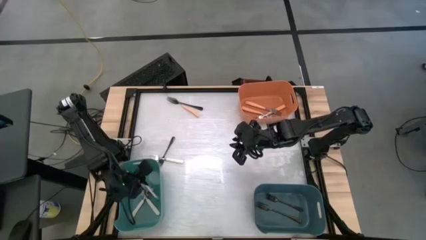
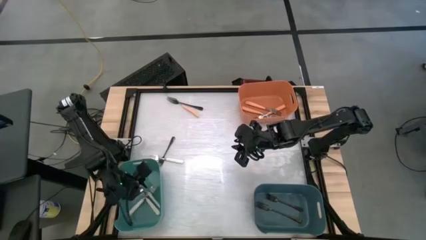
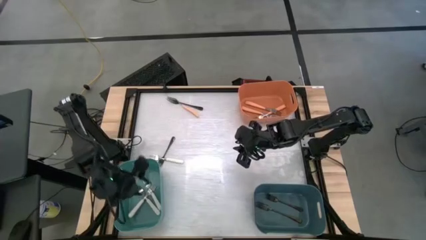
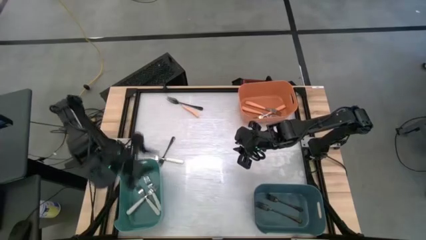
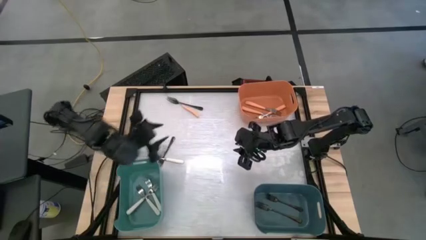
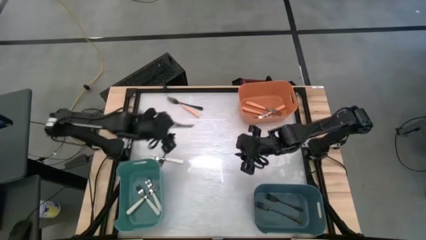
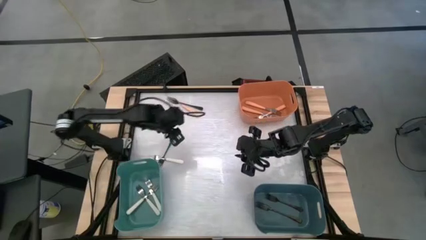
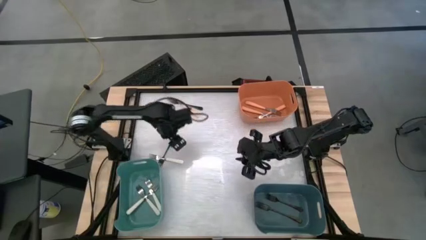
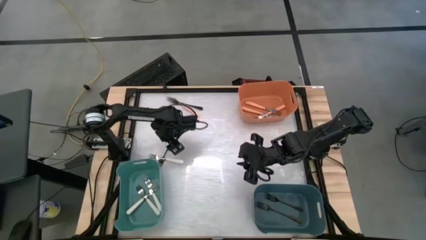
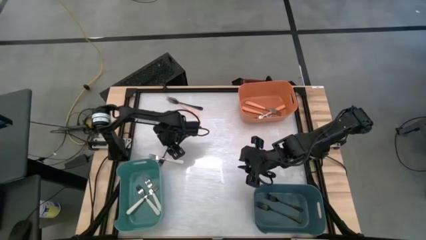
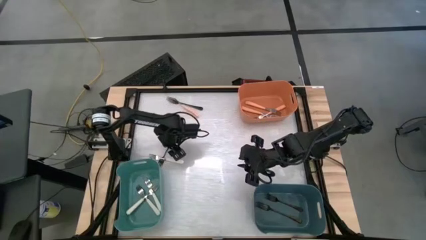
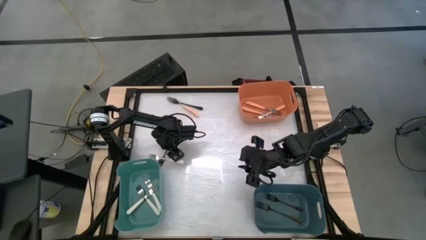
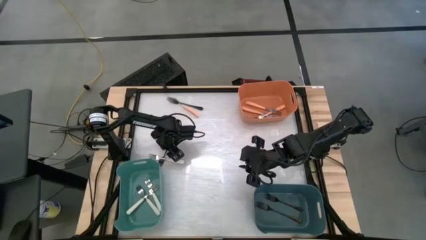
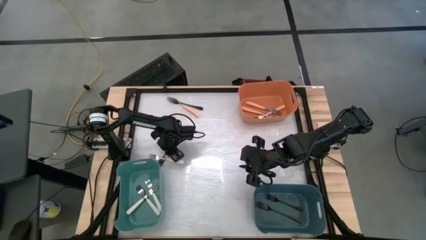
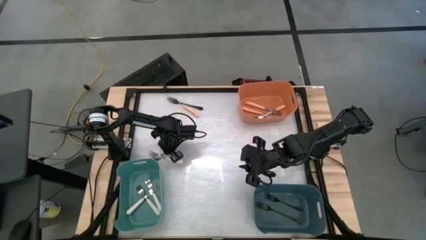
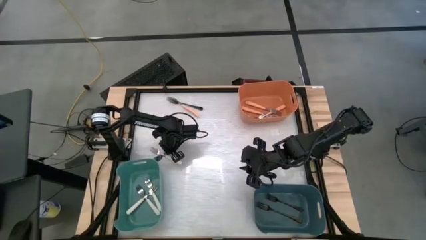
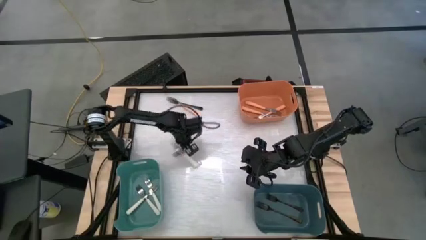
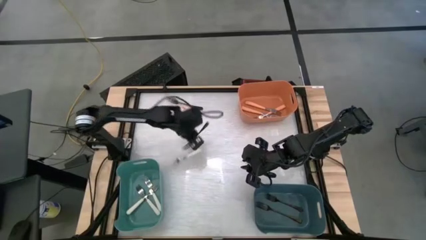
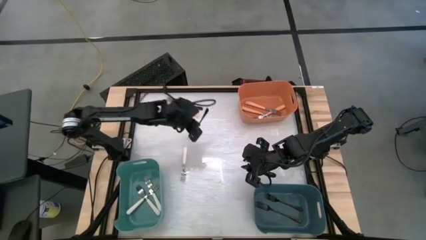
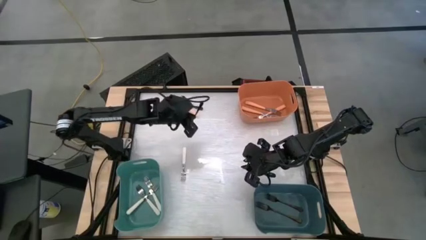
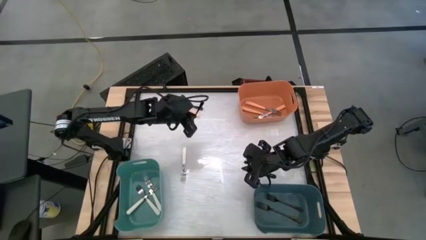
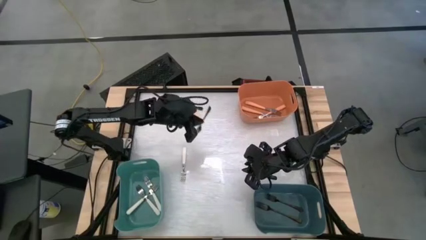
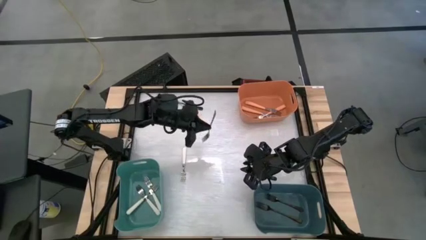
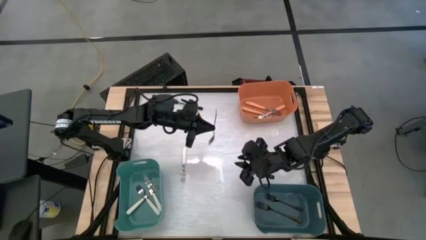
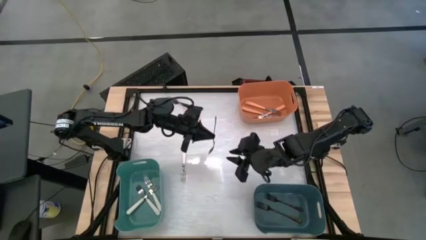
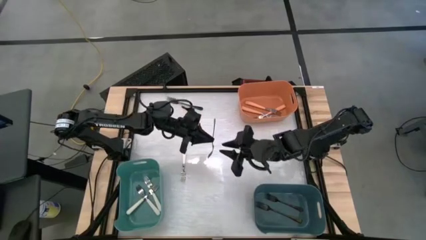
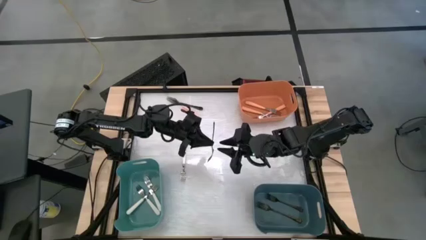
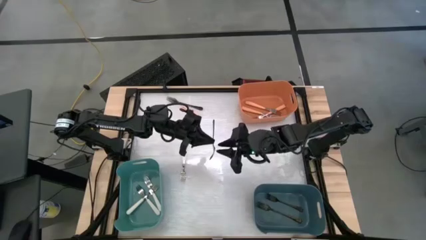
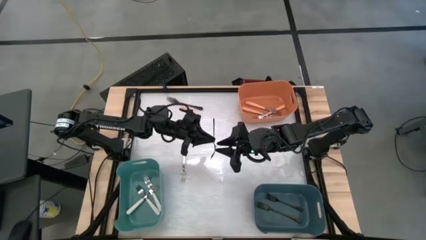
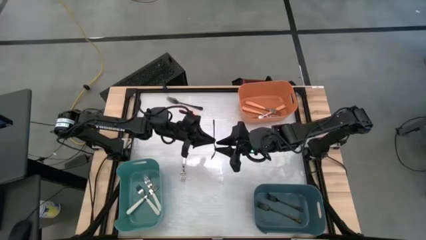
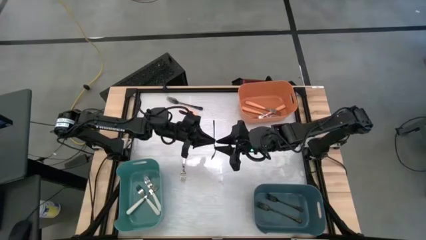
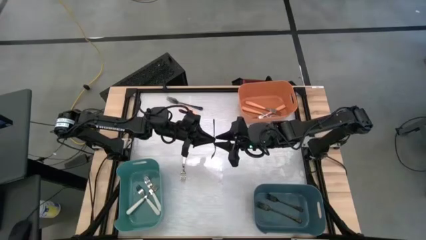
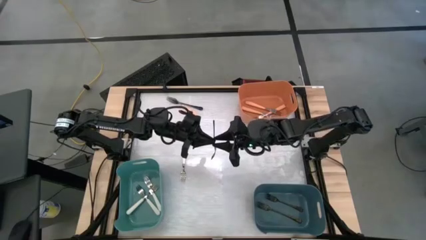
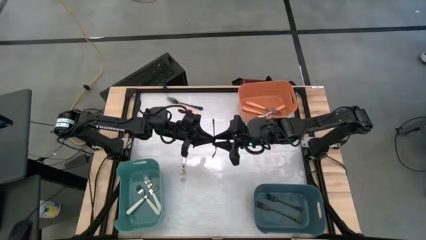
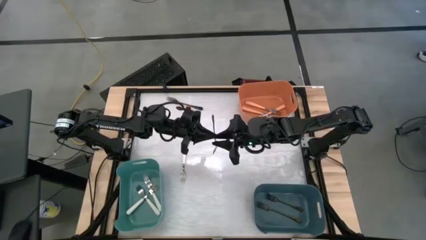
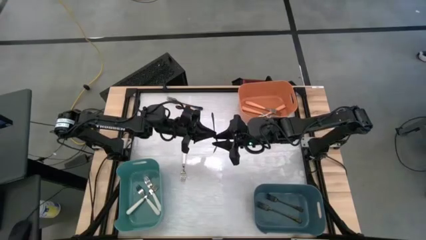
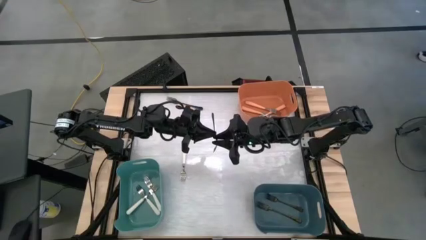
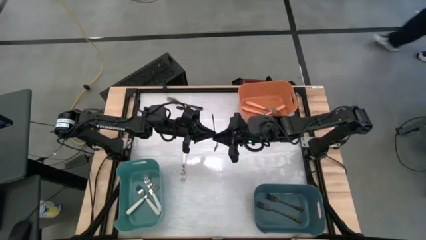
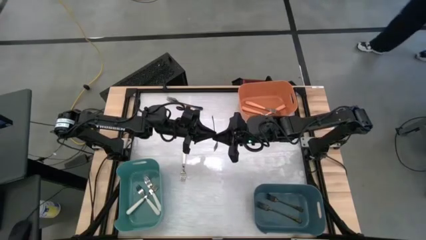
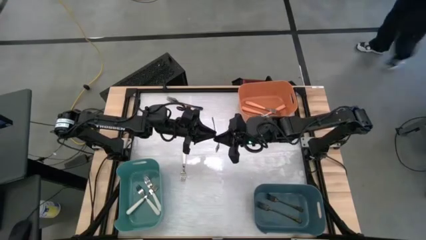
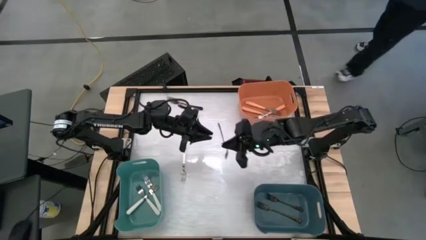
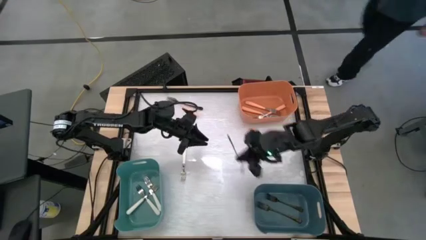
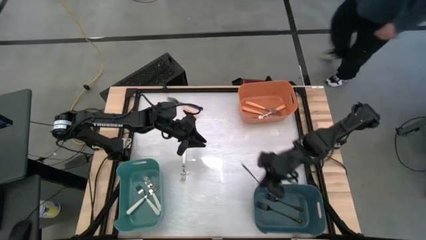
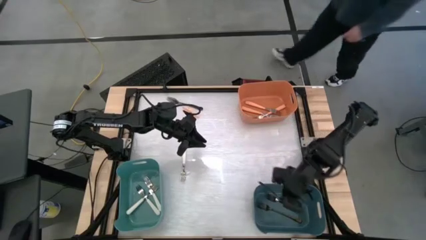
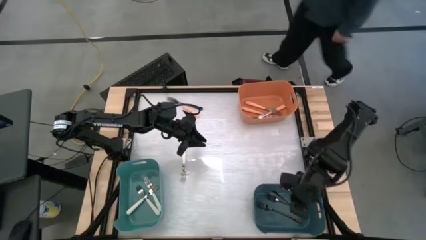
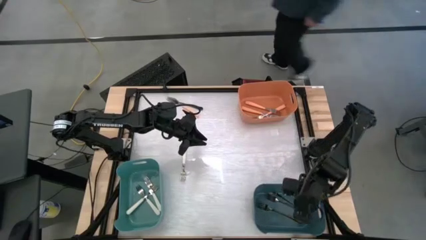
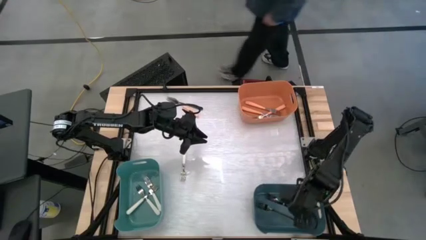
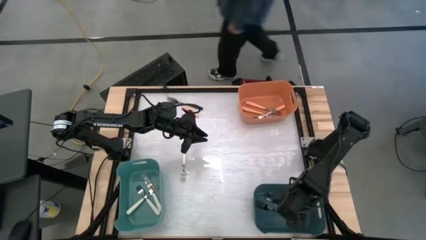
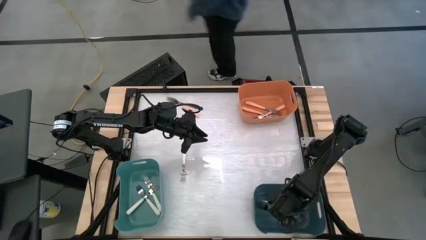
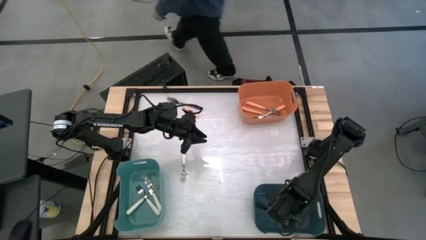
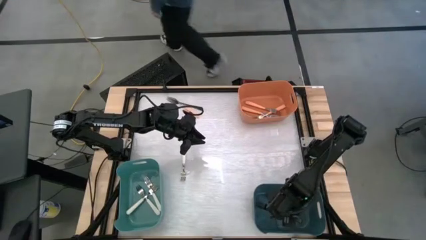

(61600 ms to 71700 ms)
Task: Sort silverware by color (type)
Put the black fork into the blue bin

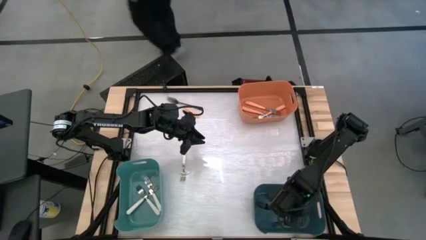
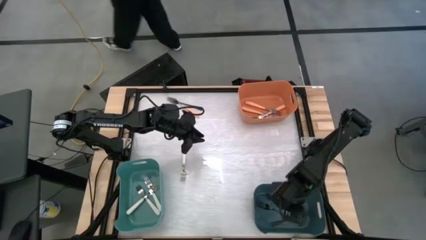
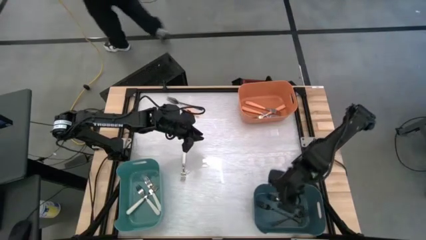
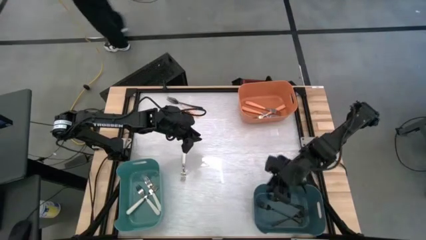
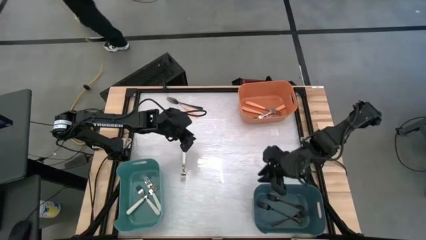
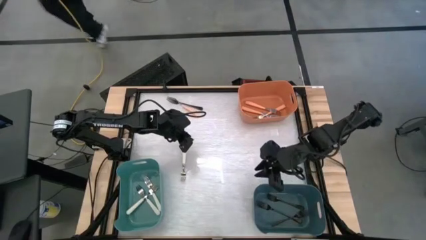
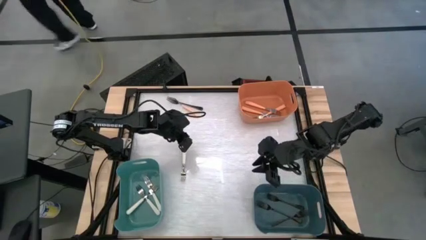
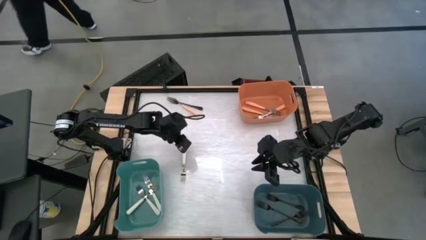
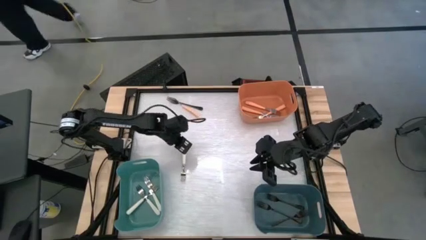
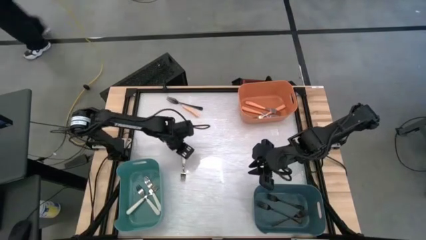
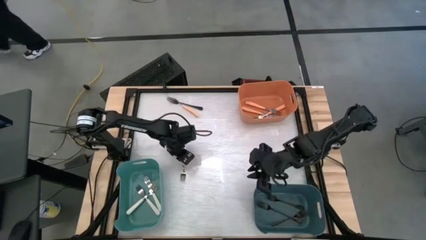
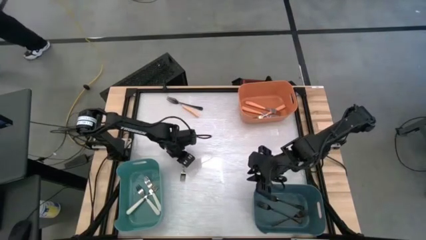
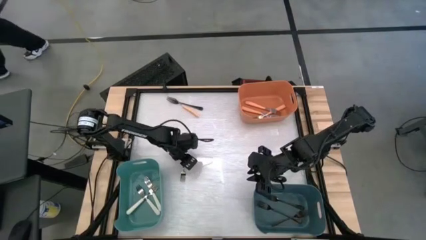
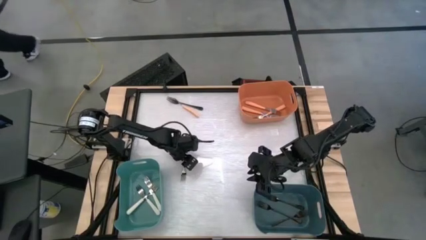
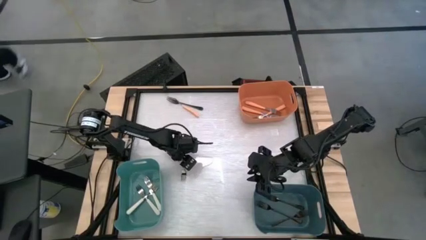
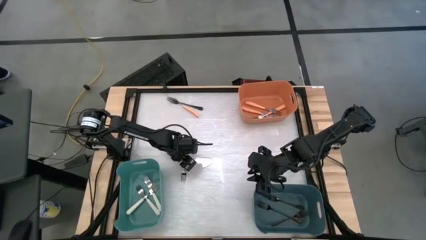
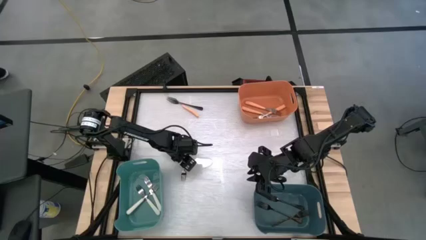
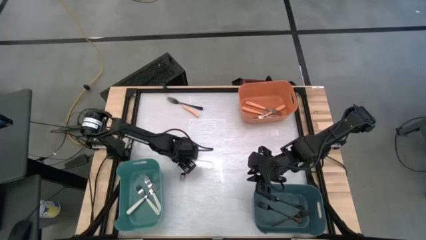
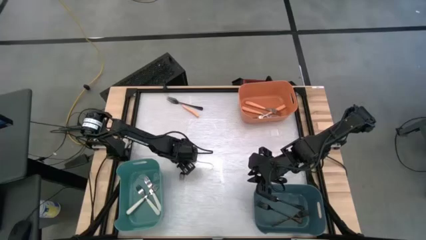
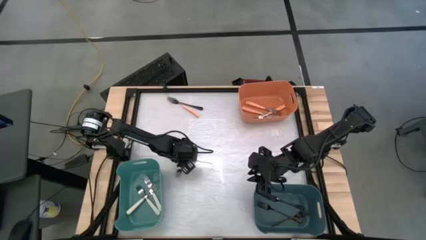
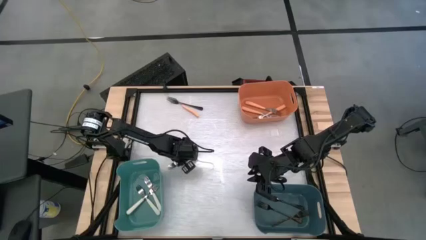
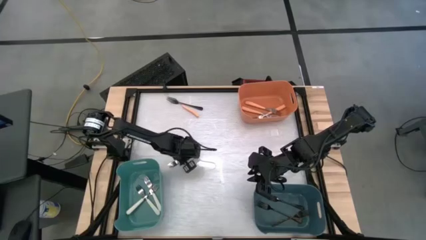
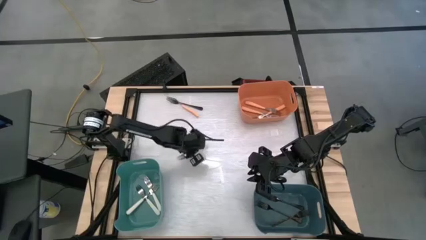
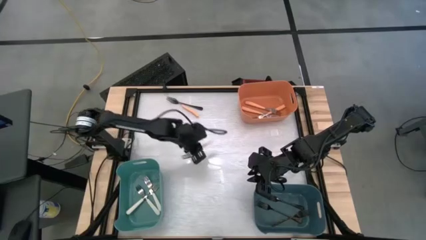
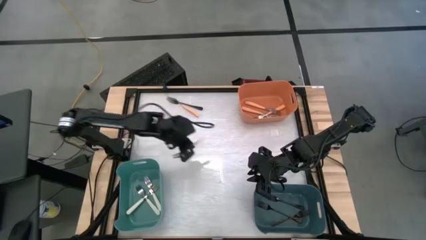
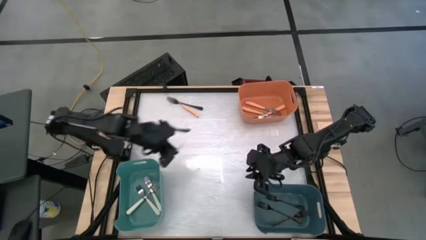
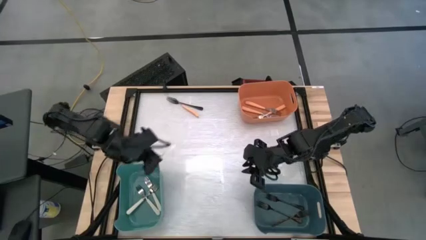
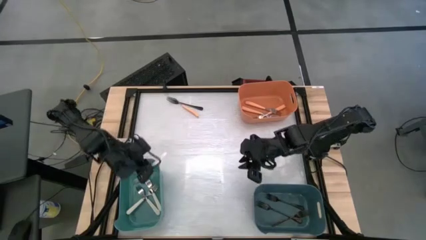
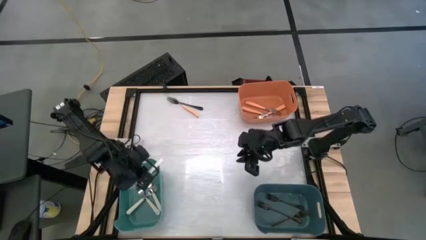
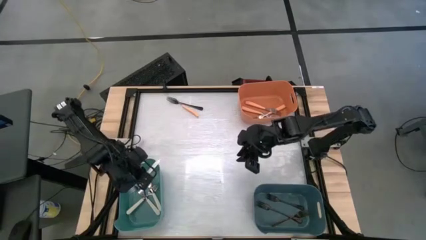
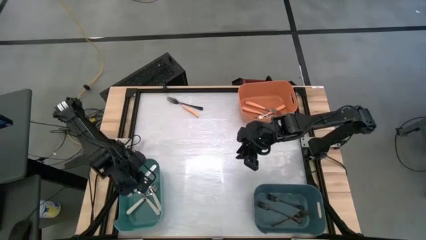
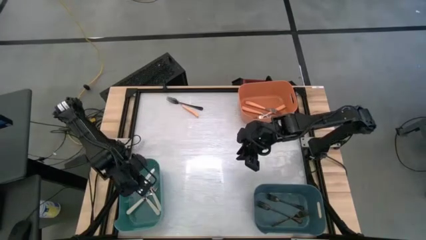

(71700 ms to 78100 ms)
Put the white fork into the green bin
